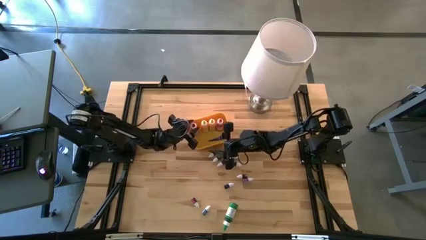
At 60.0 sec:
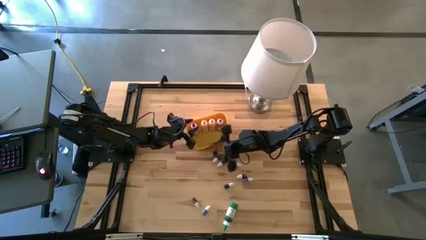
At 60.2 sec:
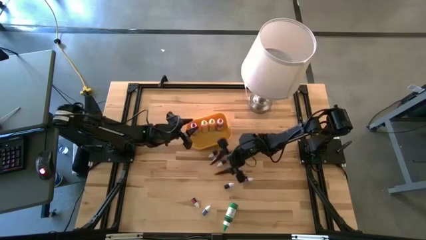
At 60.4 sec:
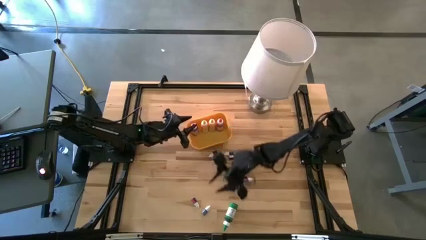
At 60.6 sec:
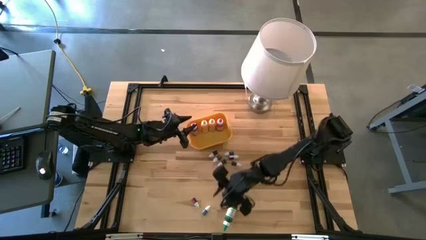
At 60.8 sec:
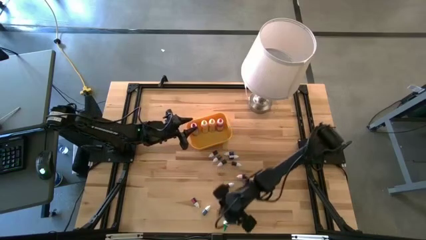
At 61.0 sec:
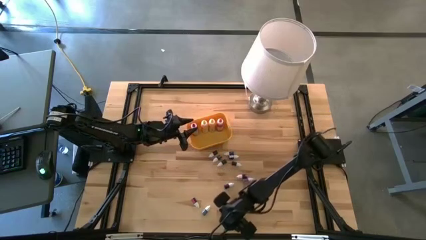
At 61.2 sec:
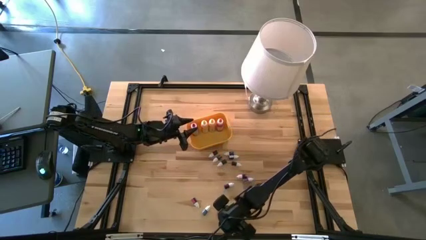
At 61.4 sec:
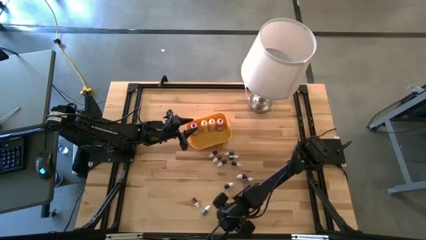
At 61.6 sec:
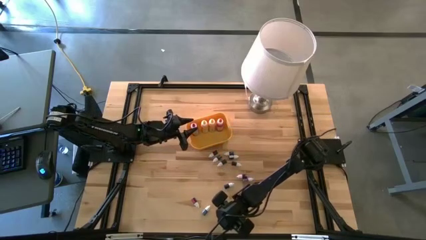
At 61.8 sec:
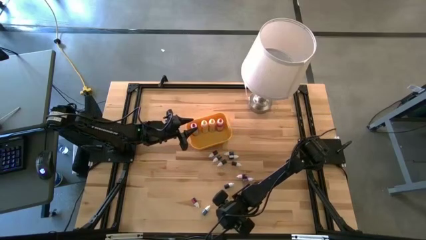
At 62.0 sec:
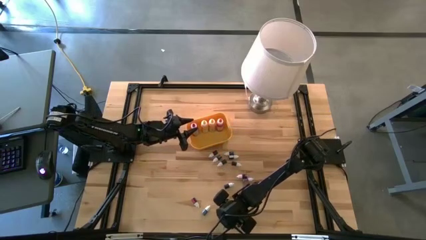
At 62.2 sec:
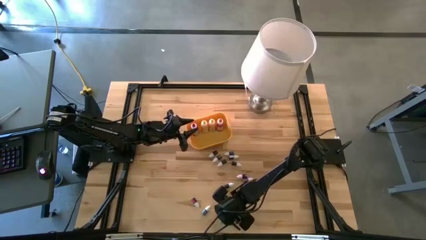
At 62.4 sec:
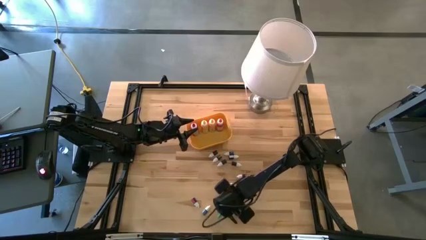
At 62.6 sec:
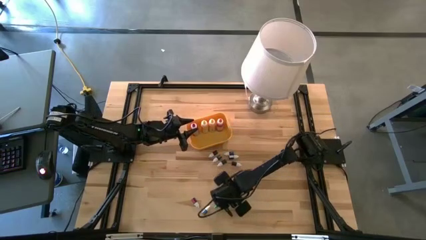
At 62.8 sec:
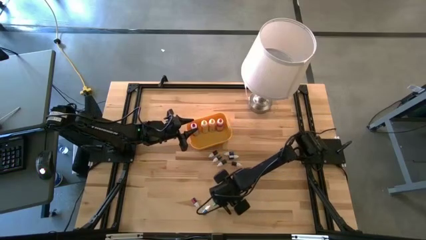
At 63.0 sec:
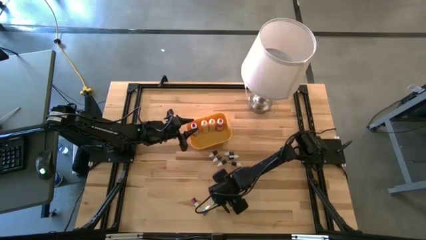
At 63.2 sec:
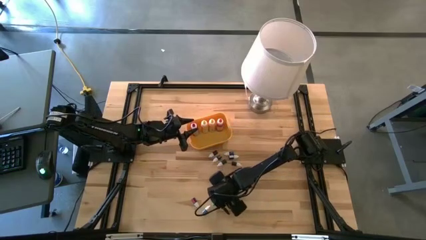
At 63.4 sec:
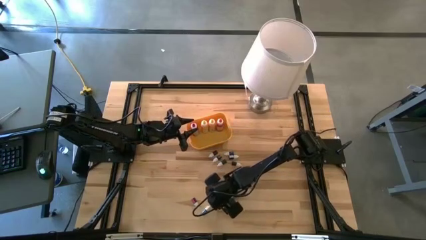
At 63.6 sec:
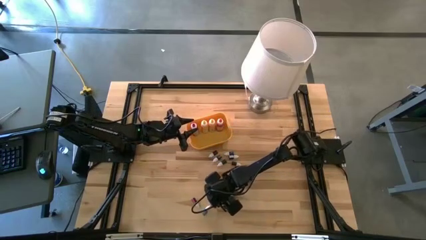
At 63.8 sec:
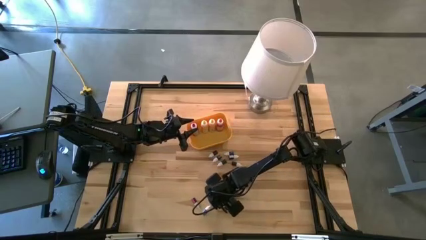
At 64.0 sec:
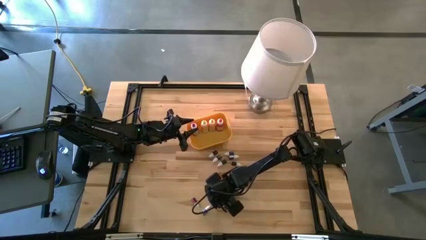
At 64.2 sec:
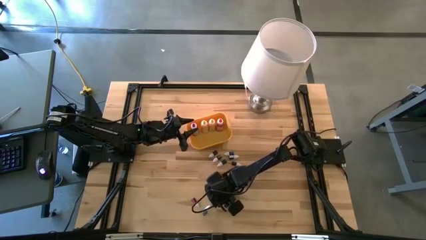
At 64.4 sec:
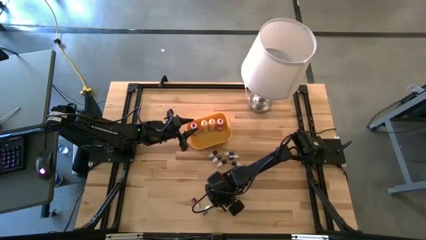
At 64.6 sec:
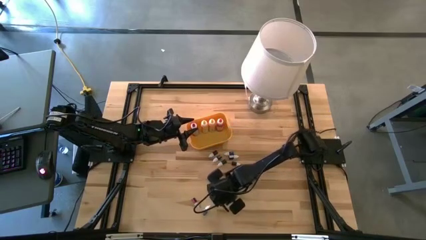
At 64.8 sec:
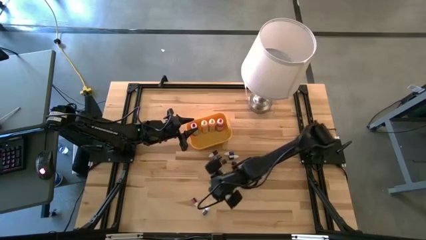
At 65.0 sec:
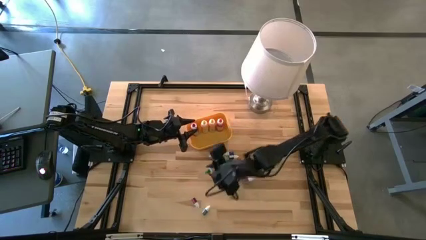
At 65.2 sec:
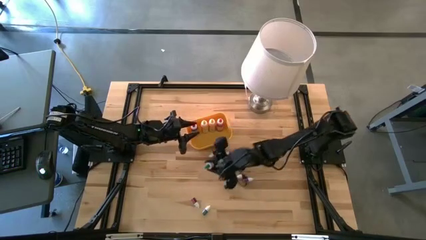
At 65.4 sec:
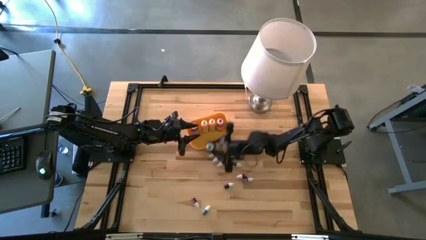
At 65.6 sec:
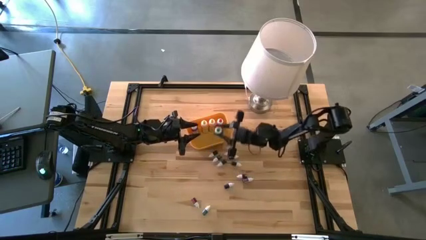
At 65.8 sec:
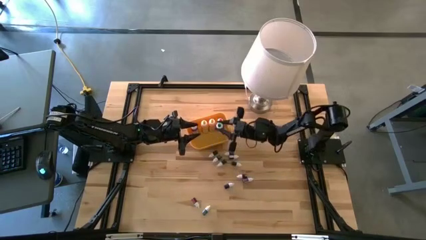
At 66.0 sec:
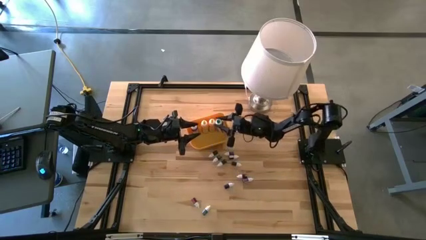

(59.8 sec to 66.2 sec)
Task: Pick & Place food coloring
Put the large green food coloring bottle into the yellow bin

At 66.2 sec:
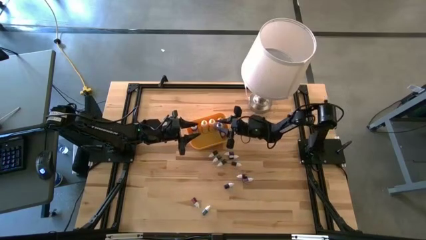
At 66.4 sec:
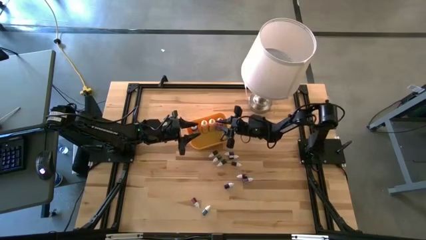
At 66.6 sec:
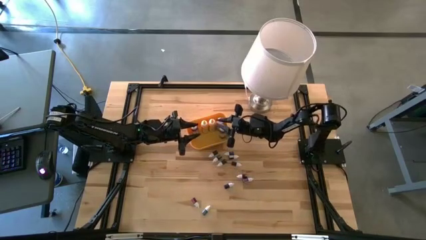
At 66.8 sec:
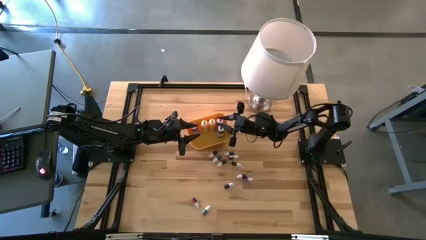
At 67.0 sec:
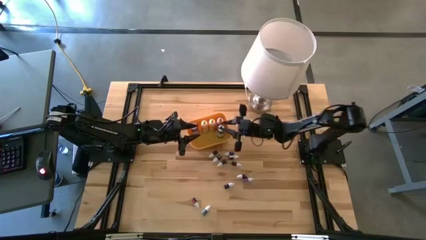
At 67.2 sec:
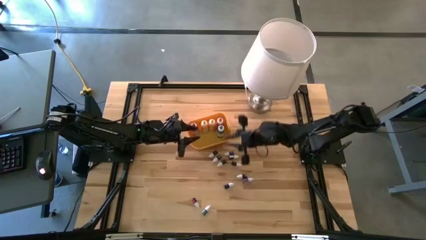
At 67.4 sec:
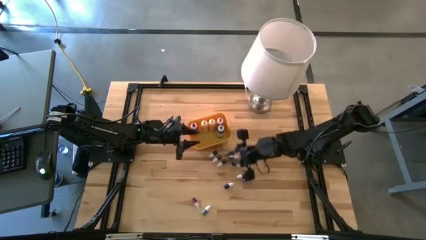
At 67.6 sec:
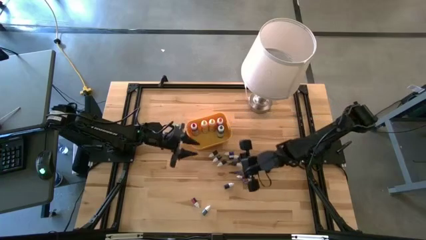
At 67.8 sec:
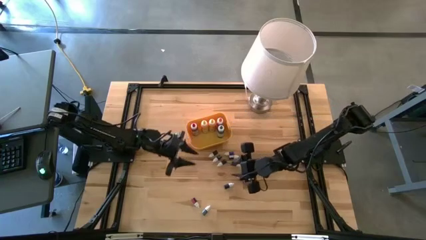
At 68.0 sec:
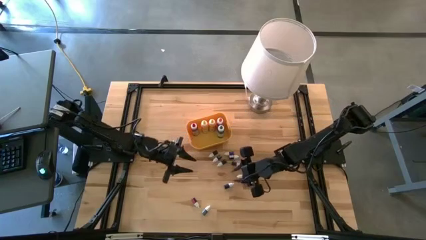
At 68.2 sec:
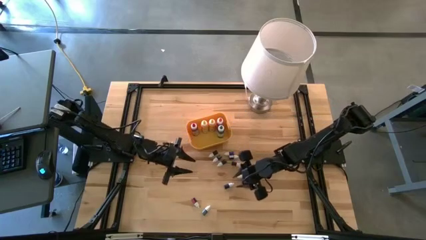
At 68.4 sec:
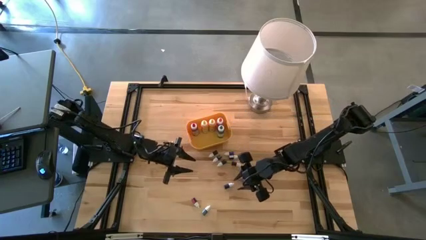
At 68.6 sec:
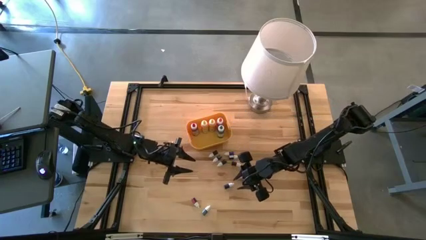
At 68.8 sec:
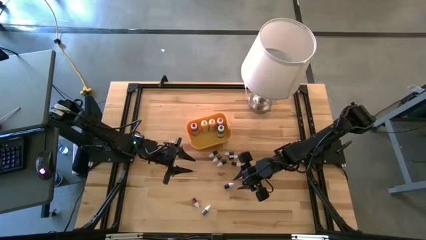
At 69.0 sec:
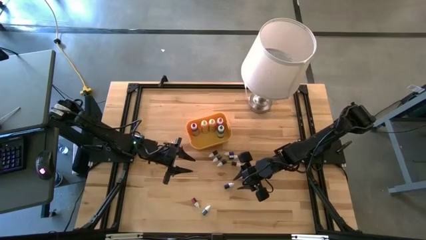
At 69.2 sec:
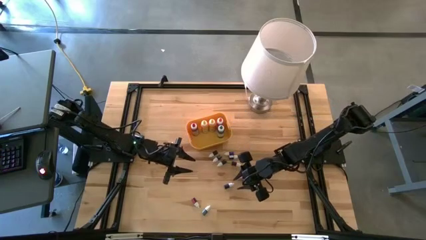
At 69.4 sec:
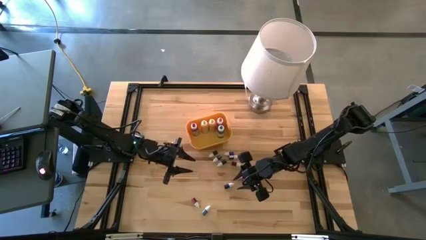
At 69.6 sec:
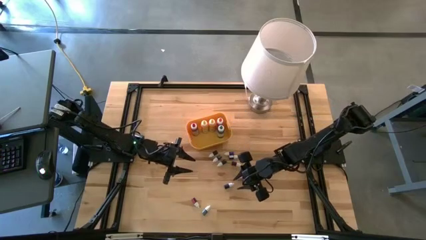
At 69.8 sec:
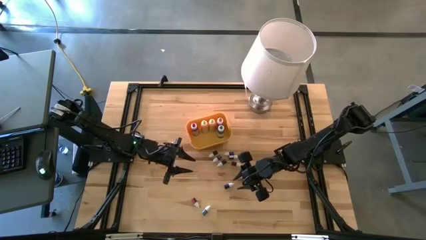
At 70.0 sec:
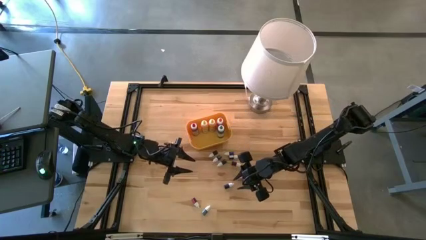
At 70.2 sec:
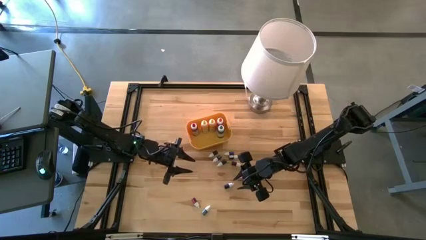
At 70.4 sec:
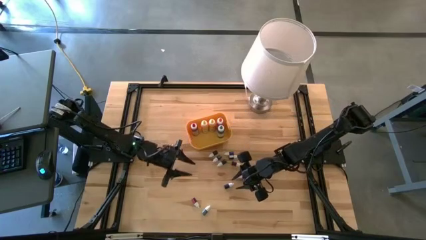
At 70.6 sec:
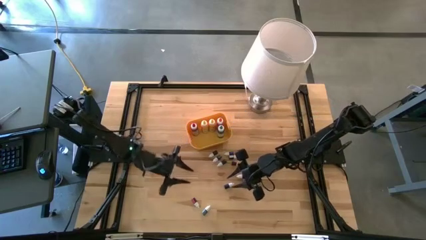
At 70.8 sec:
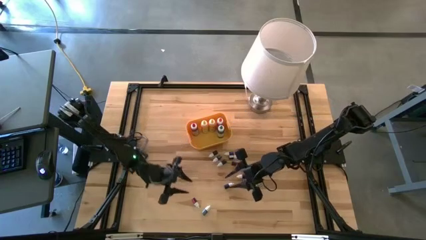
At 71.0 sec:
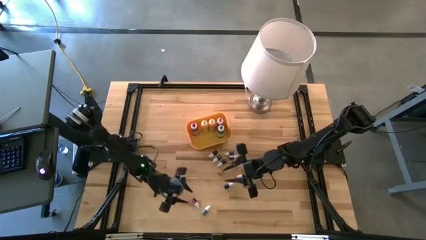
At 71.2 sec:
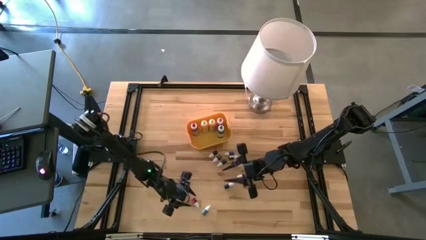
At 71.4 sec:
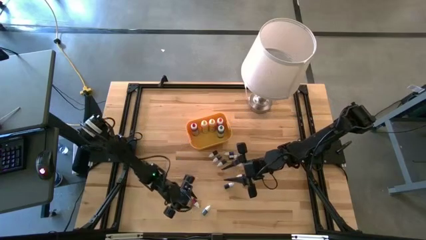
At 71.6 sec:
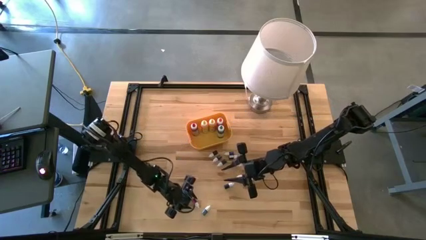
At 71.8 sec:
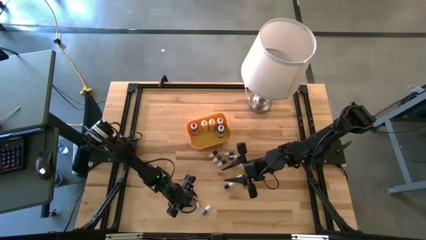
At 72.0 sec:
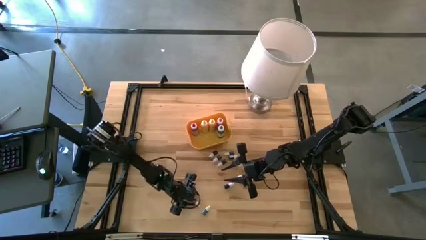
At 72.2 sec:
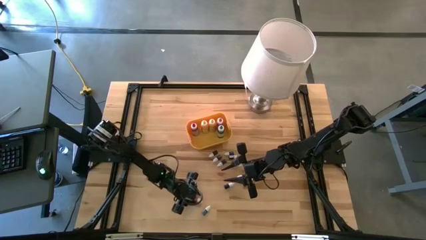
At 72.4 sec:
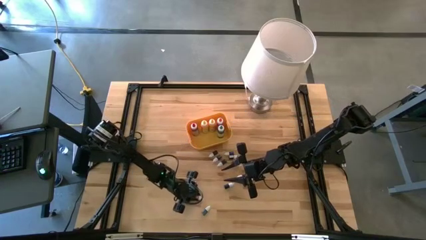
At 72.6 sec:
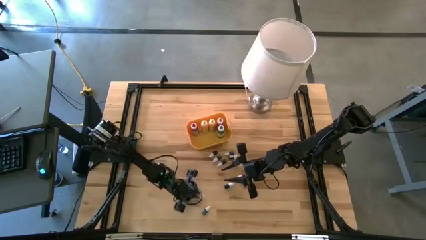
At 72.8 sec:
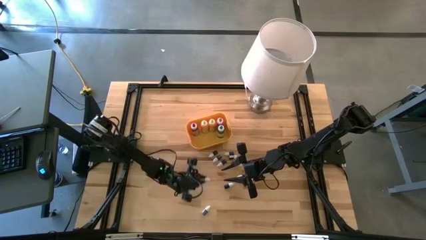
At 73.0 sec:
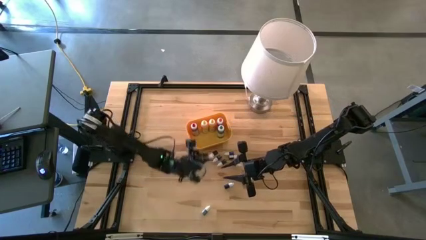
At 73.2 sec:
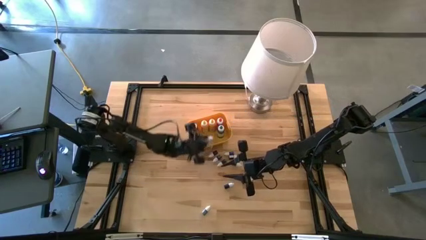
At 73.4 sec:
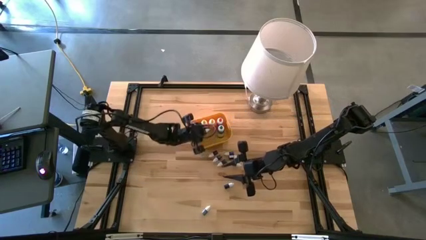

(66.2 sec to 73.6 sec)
Put the small pink food coloring bottle into the yellow bin

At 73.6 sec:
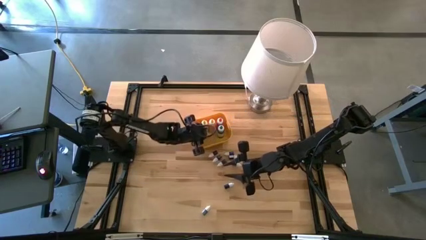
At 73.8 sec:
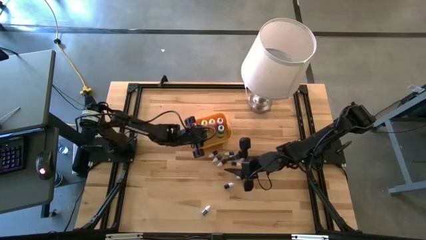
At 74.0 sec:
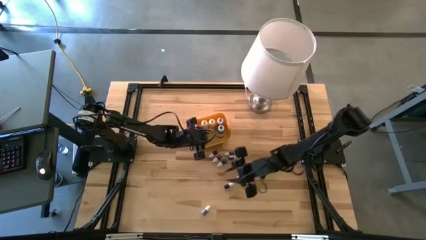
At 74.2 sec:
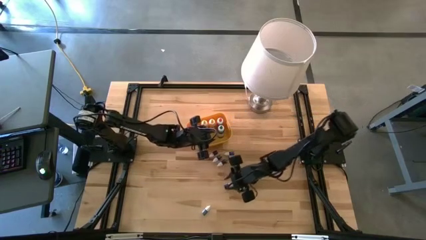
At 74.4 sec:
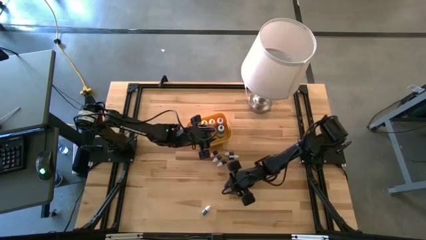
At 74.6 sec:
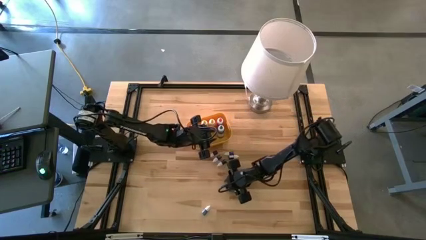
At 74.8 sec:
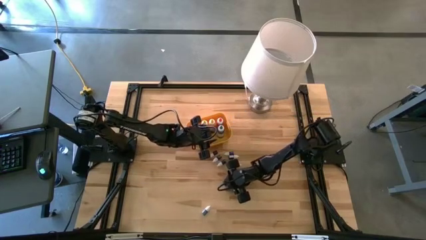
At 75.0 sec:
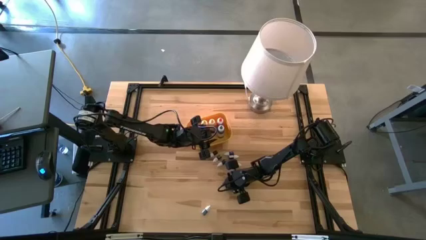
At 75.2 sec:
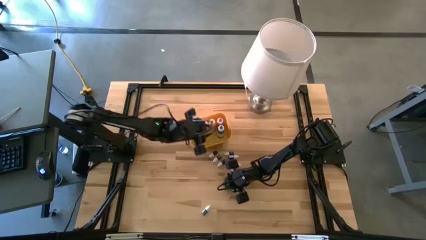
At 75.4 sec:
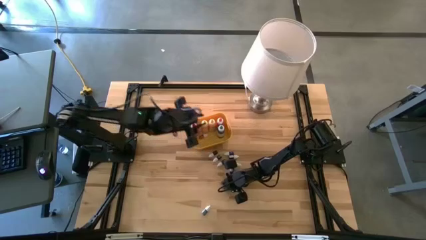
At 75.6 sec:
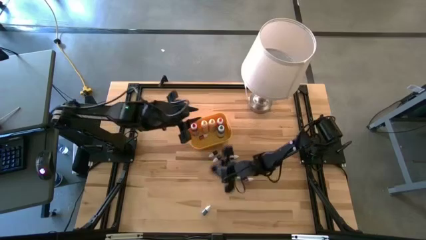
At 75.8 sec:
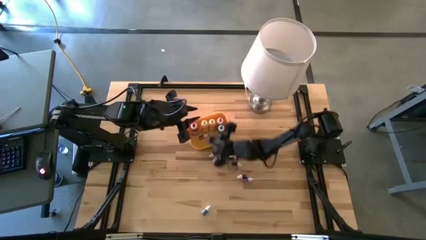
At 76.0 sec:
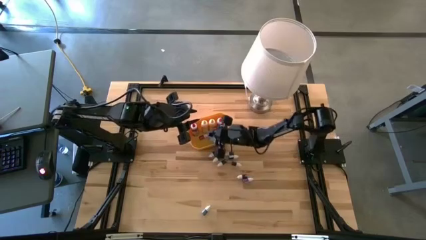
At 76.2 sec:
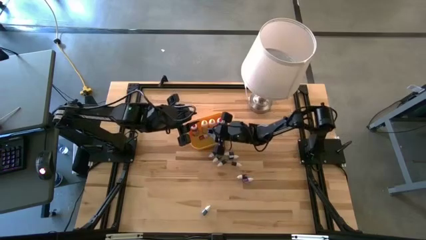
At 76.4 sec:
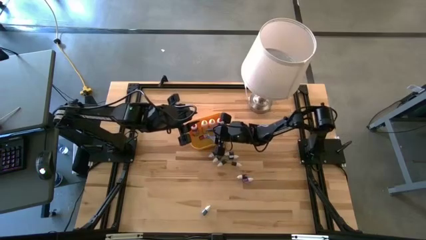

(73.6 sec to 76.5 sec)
Put the small blue food coloring bottle into the yellow bin
